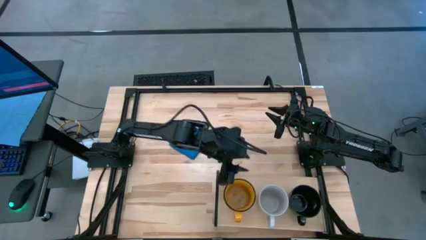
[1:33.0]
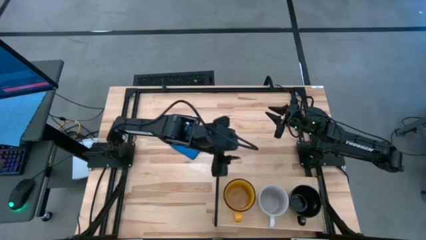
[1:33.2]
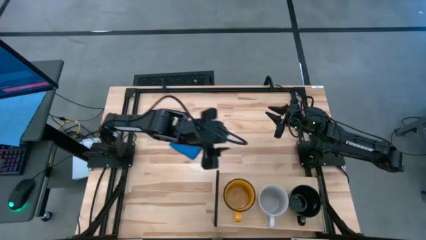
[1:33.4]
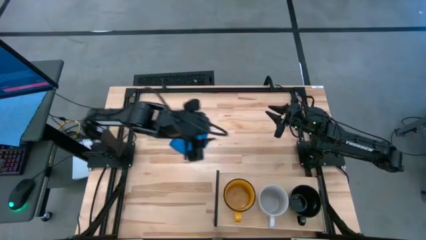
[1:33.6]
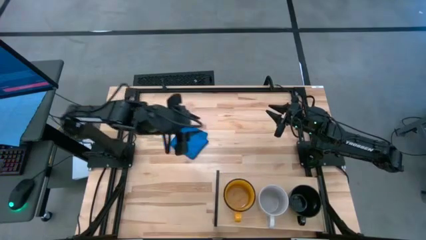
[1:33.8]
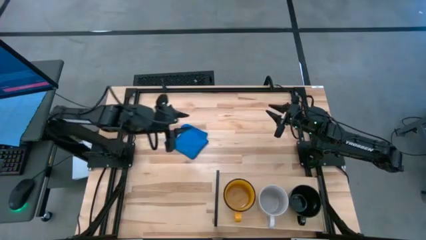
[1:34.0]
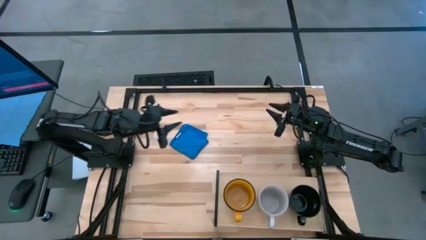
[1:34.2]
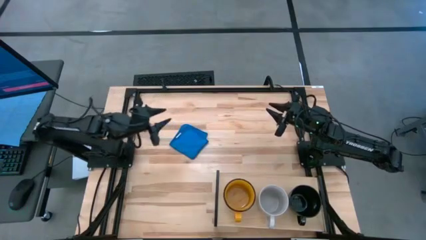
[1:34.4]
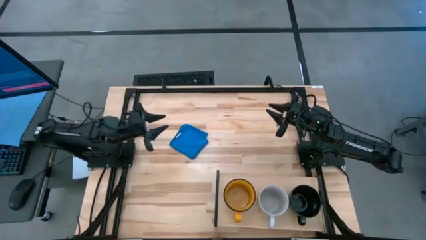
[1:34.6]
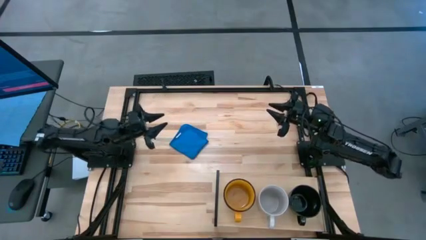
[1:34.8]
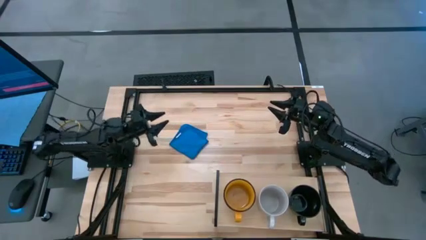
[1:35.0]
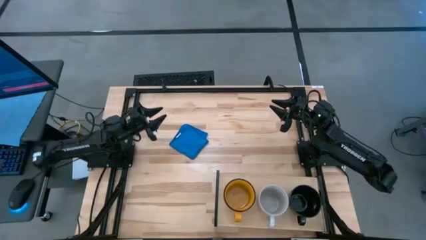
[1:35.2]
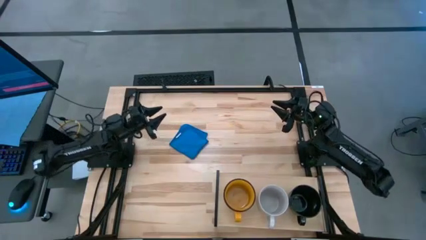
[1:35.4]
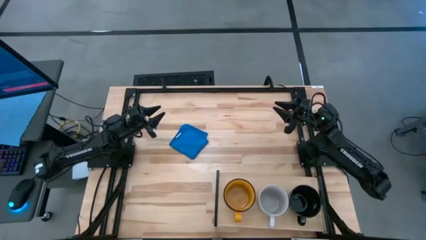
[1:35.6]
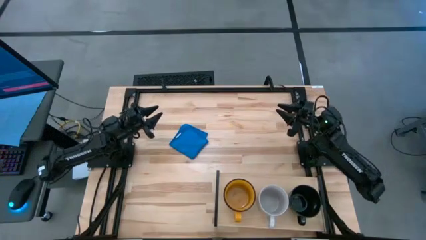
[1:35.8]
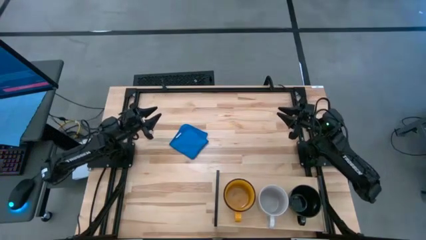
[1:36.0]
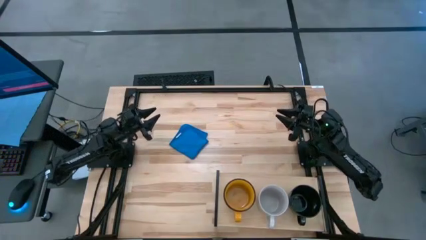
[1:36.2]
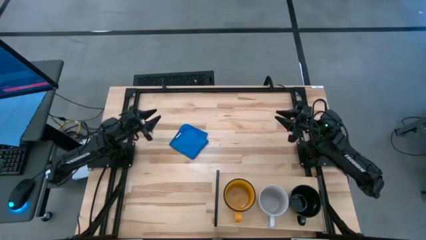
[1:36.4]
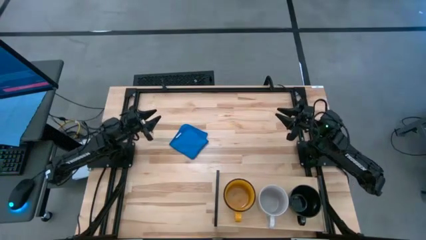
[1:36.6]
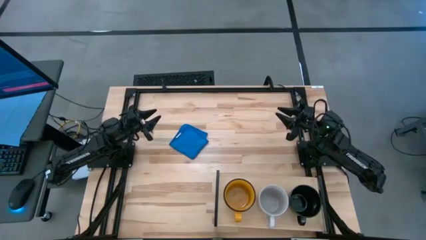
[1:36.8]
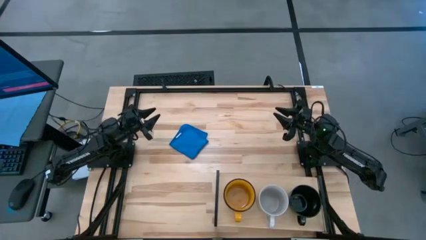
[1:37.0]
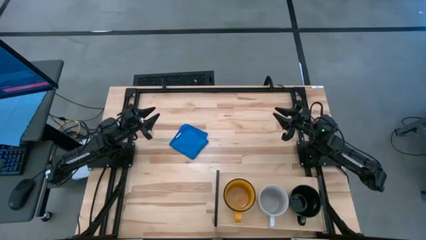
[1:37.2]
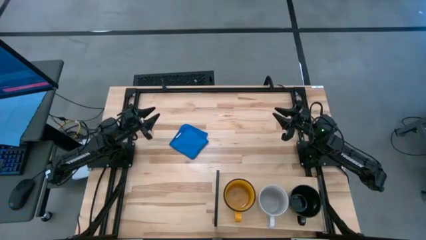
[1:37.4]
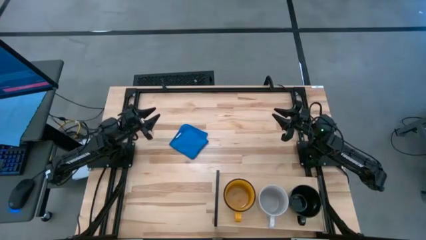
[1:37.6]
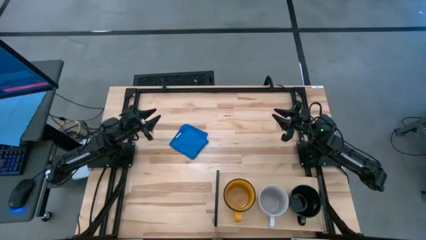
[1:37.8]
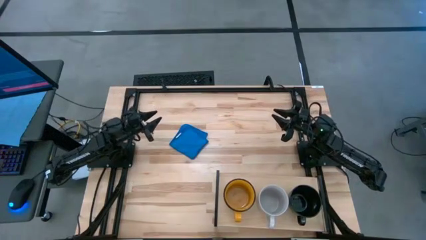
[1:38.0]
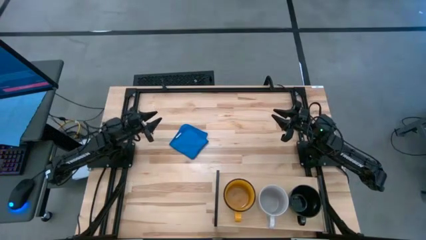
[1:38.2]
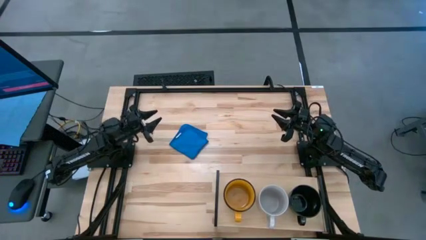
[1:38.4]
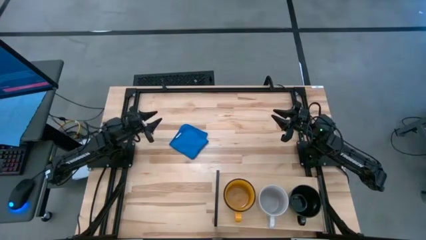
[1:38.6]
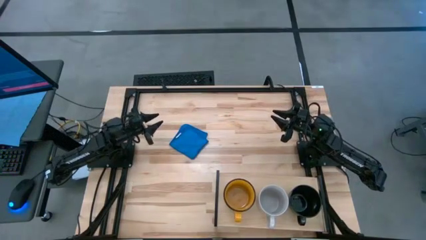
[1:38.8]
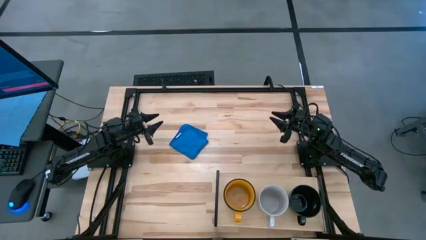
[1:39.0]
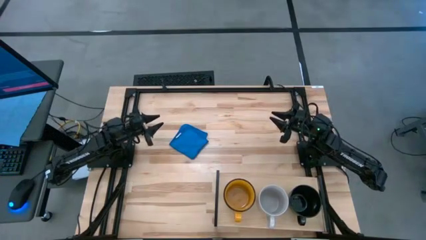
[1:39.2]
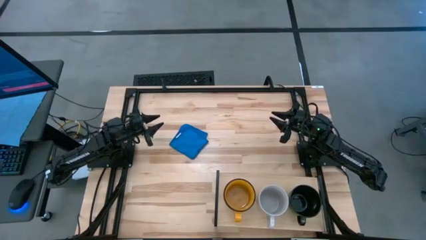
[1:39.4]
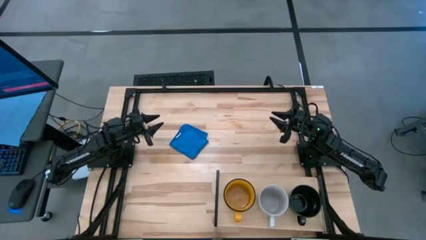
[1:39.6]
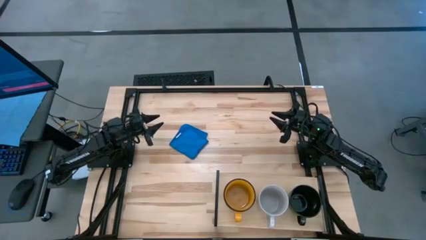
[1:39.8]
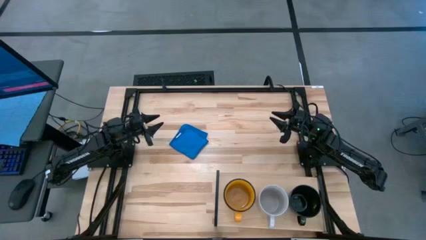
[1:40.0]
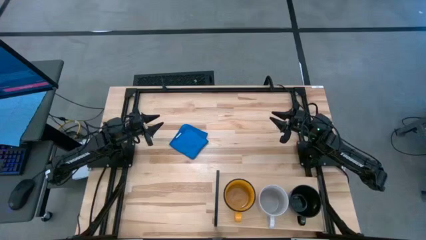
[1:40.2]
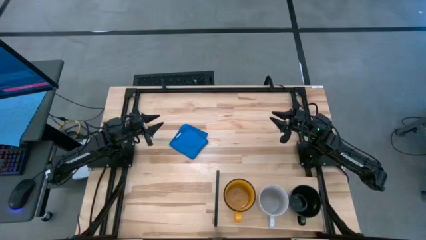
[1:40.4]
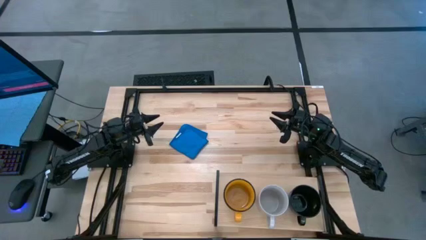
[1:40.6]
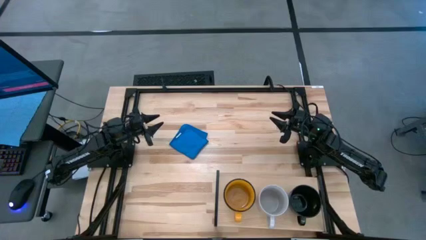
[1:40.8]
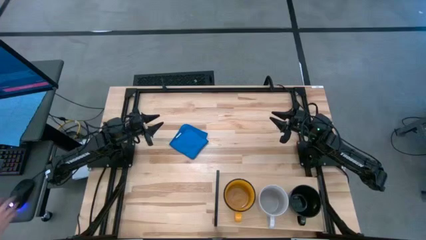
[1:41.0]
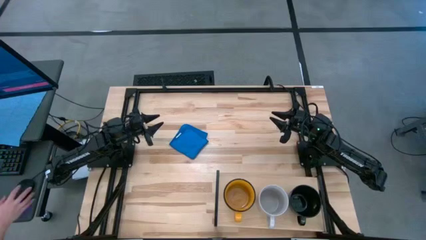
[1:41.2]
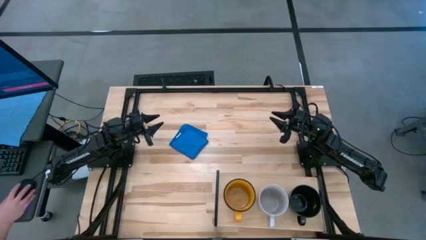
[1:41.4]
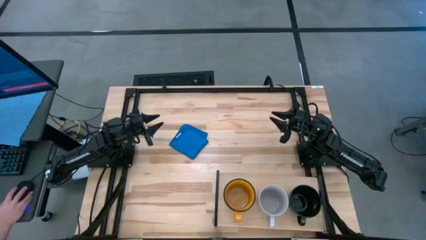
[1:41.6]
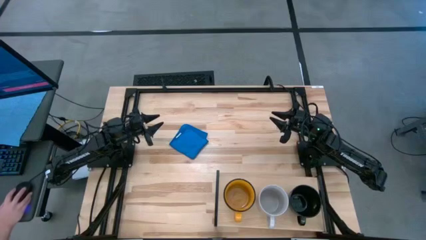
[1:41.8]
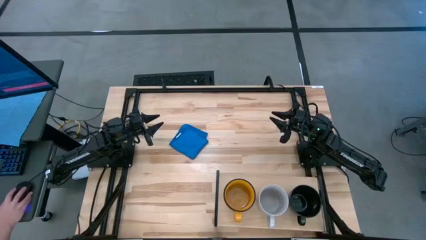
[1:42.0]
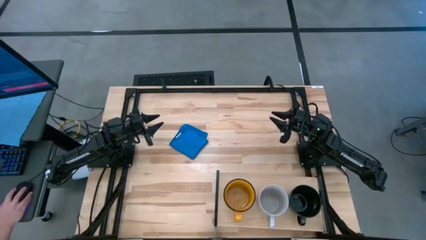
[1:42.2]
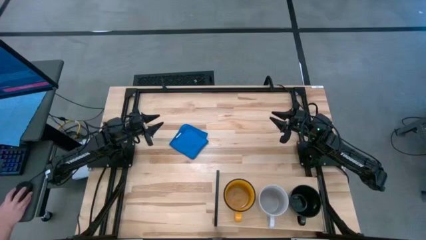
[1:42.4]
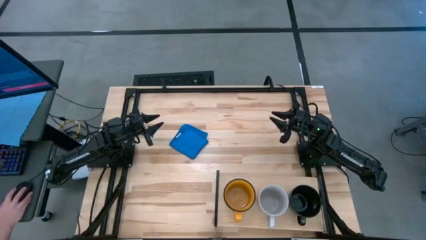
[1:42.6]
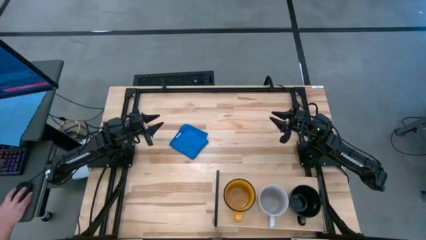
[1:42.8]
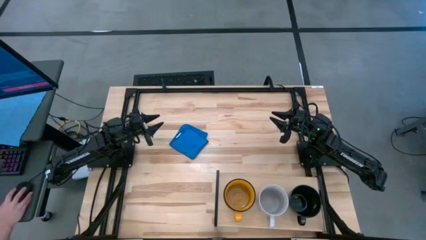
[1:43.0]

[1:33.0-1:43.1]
Task: Stack small to large cups/mugs on shelf
Return to Home Position

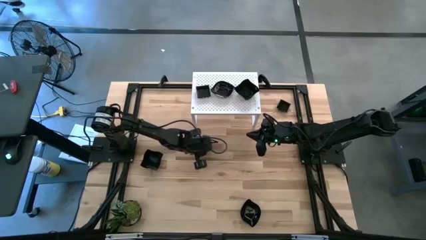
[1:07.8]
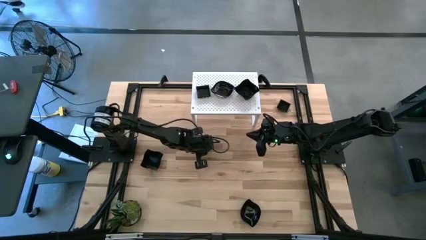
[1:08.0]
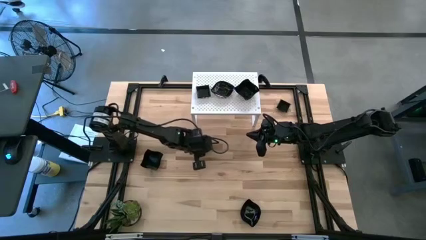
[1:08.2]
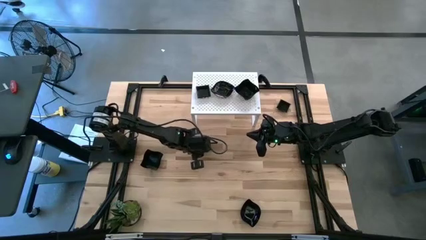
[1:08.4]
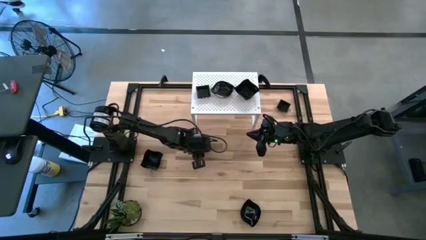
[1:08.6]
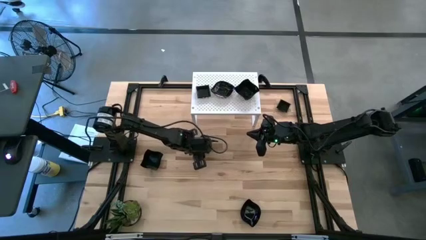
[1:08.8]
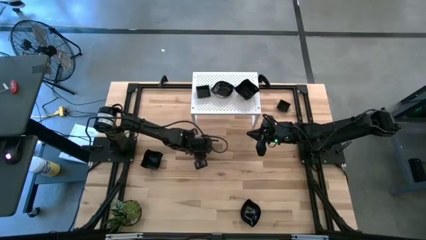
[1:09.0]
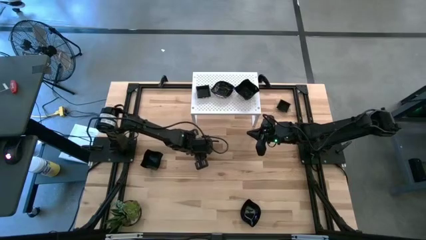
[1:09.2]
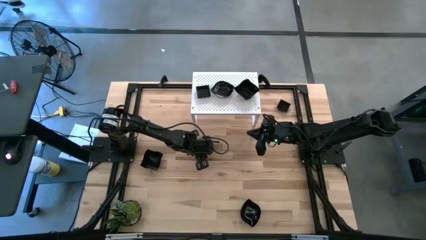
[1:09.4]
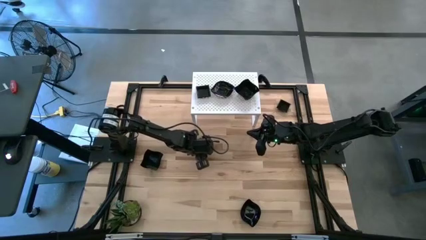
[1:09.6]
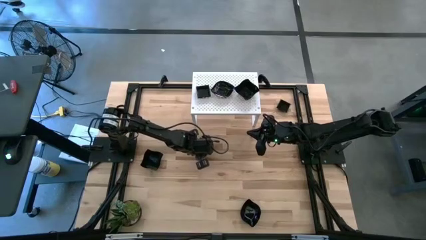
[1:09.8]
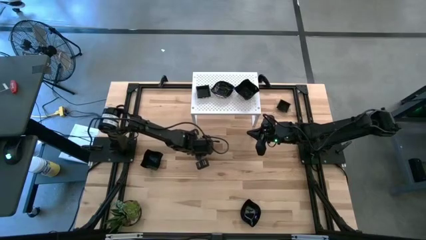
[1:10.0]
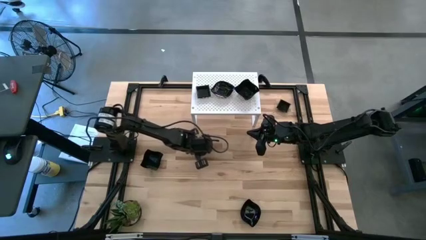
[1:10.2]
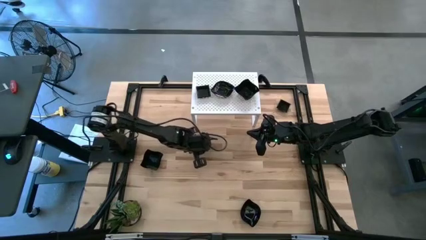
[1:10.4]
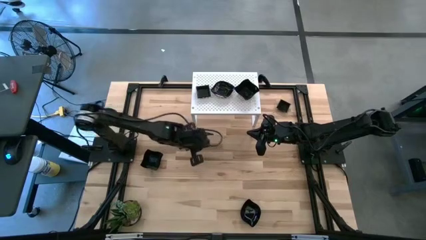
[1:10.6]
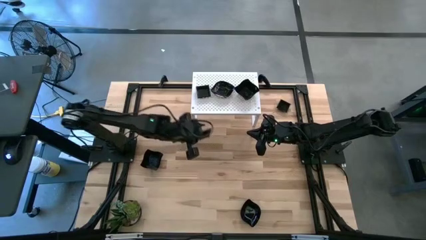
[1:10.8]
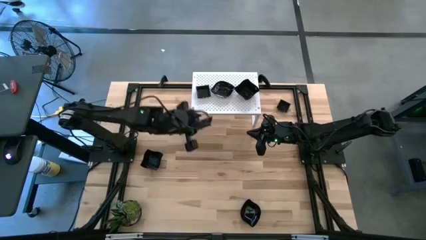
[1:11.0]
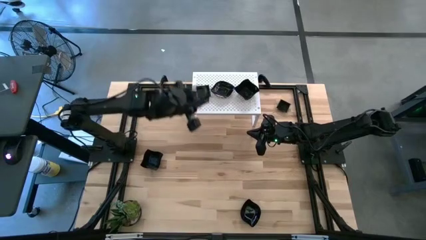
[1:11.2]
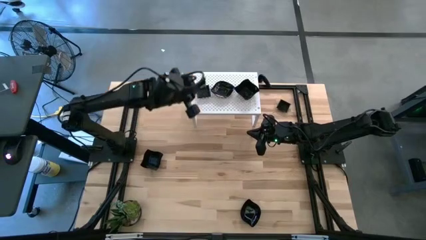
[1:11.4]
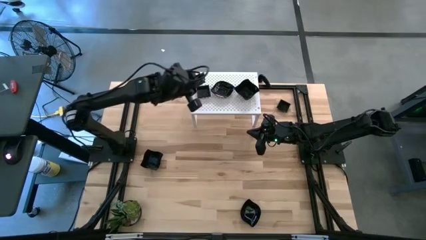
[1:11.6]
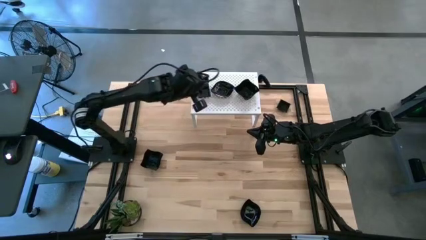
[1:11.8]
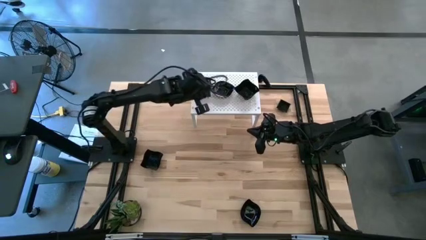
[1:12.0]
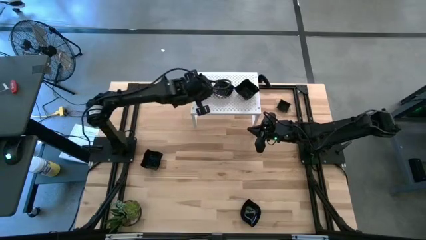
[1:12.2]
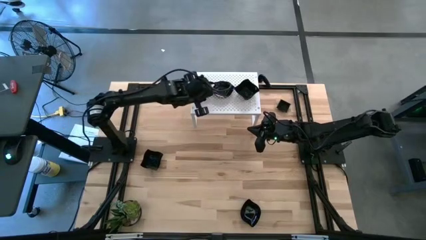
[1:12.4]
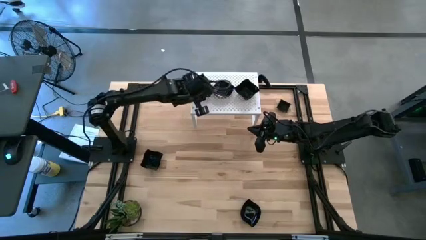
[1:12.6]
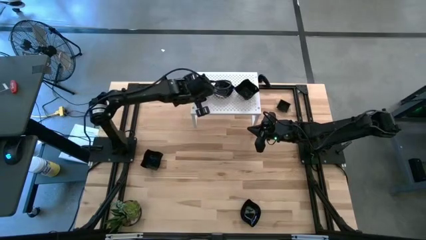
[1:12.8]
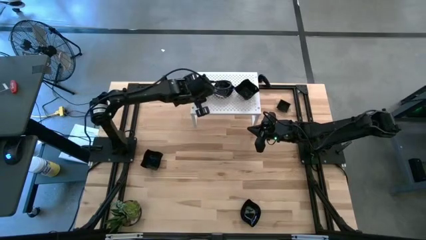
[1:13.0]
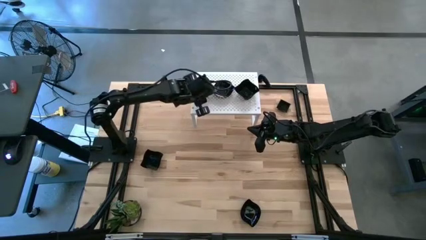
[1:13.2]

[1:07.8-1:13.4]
Task: Pick & Place Mini shaped plates
Stack the black square plate on top of the black square plates on the shelf
